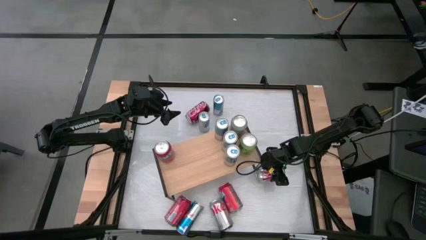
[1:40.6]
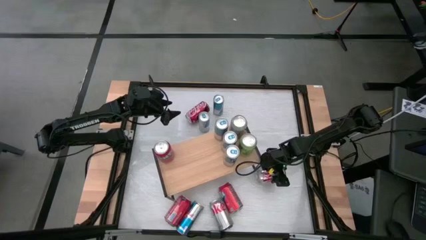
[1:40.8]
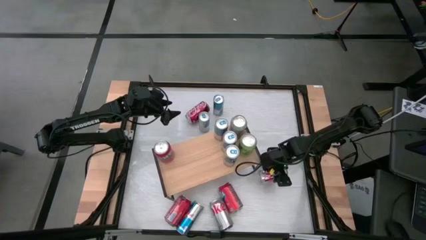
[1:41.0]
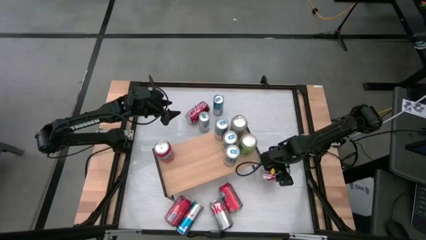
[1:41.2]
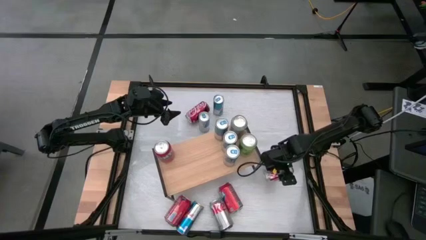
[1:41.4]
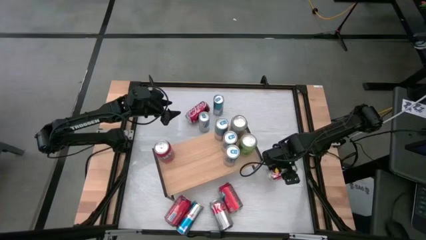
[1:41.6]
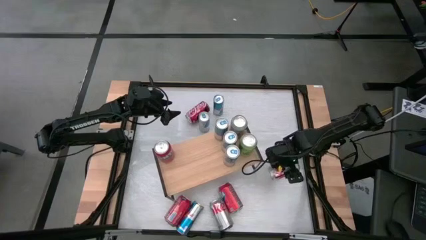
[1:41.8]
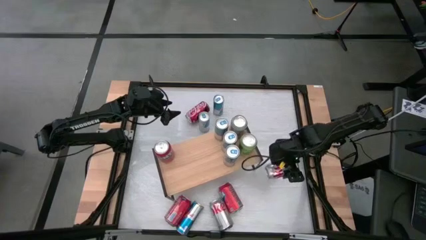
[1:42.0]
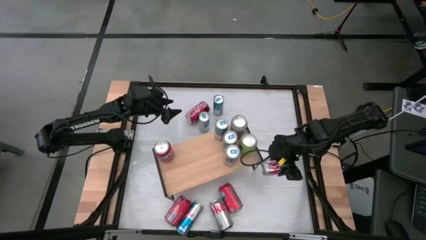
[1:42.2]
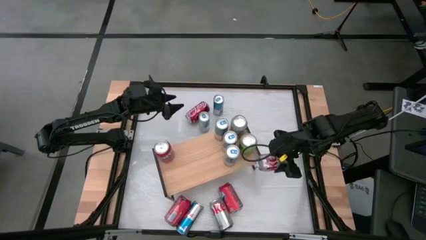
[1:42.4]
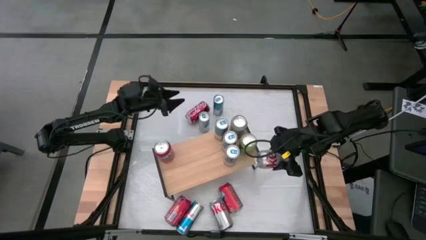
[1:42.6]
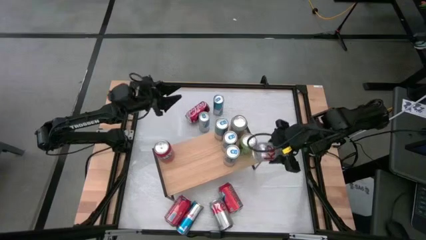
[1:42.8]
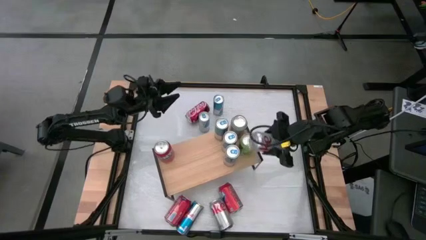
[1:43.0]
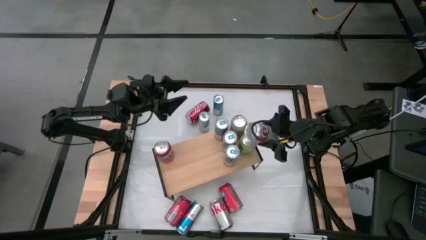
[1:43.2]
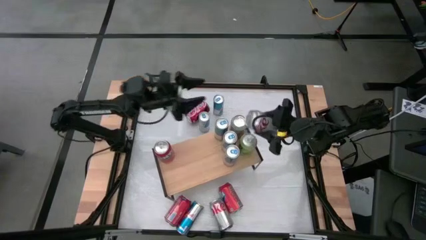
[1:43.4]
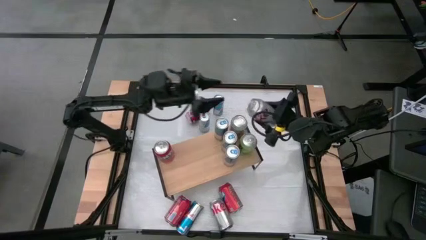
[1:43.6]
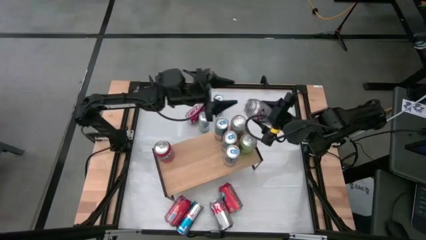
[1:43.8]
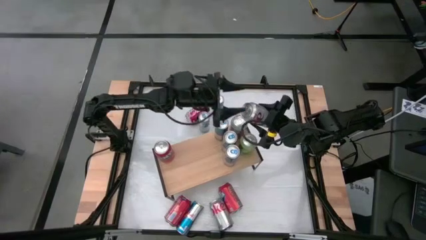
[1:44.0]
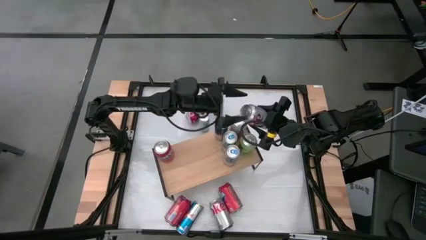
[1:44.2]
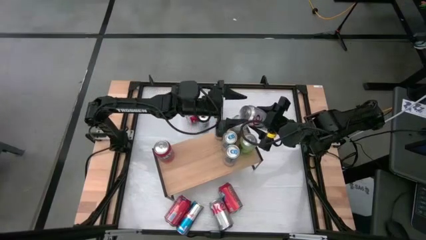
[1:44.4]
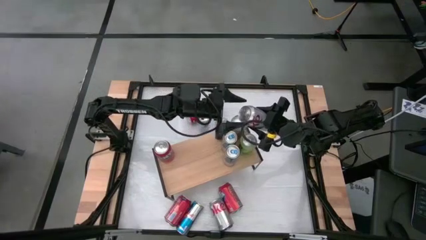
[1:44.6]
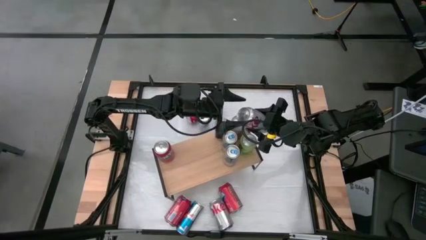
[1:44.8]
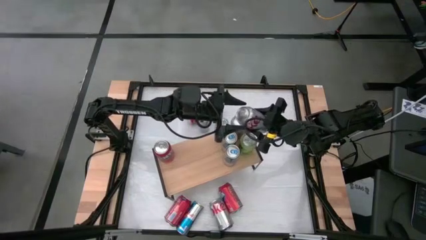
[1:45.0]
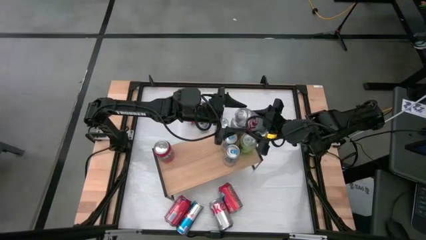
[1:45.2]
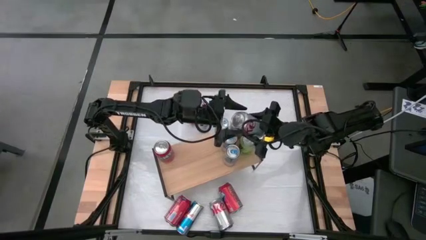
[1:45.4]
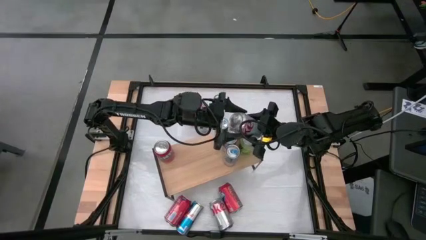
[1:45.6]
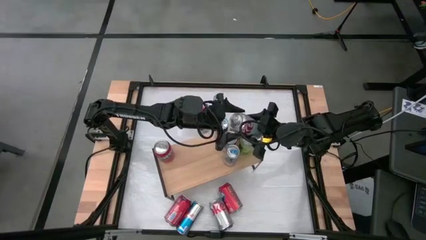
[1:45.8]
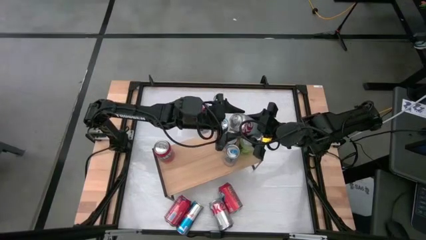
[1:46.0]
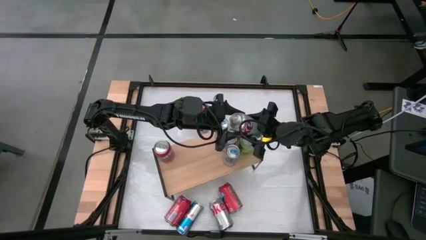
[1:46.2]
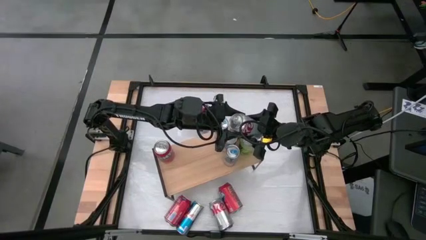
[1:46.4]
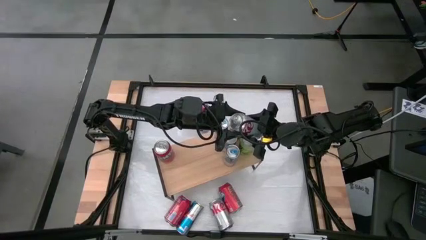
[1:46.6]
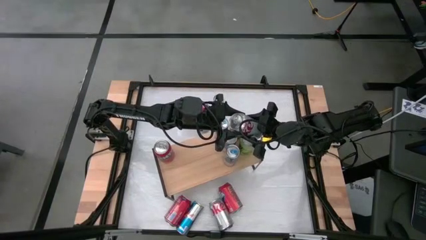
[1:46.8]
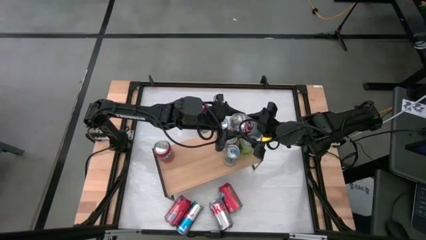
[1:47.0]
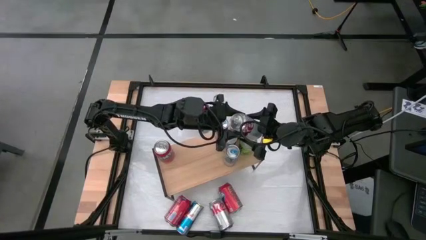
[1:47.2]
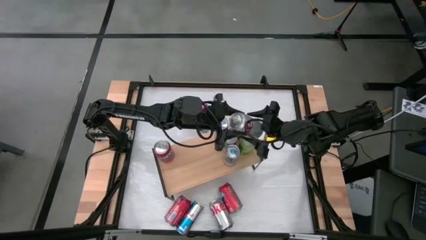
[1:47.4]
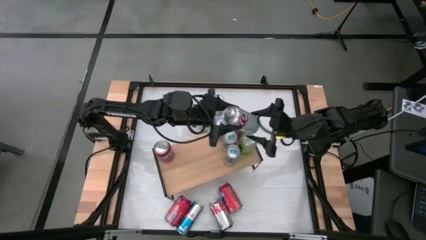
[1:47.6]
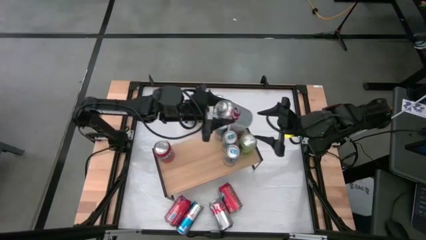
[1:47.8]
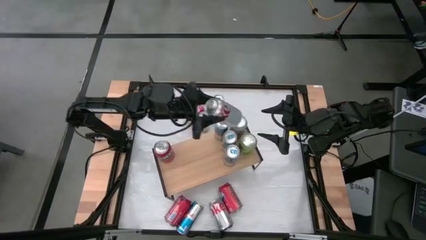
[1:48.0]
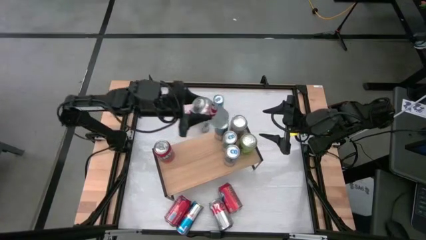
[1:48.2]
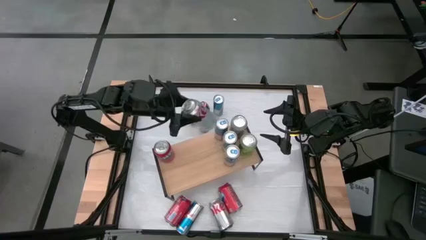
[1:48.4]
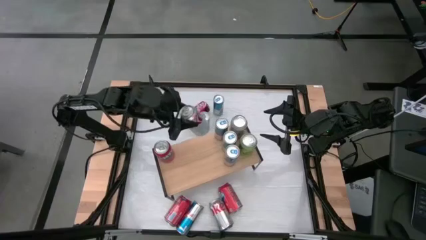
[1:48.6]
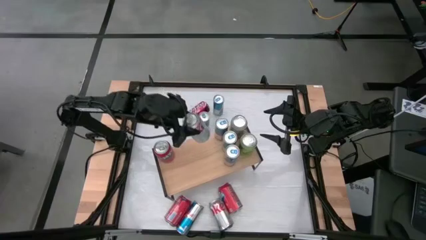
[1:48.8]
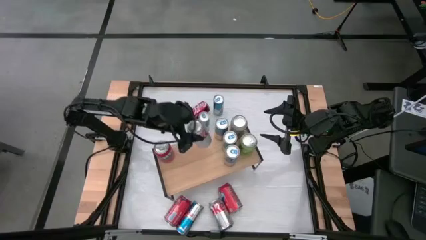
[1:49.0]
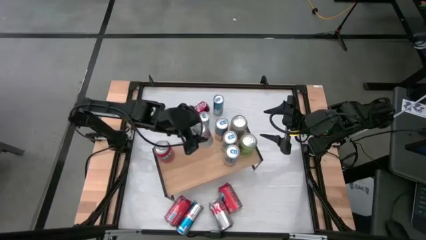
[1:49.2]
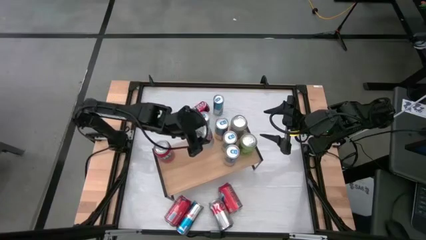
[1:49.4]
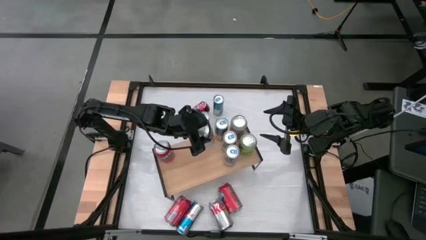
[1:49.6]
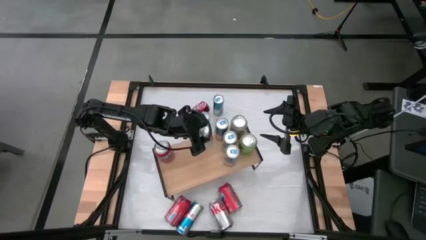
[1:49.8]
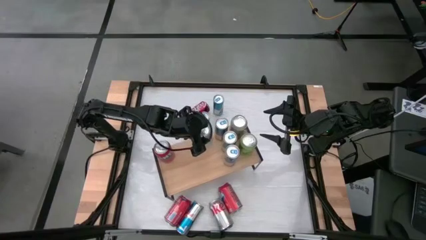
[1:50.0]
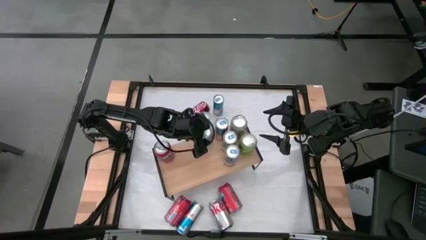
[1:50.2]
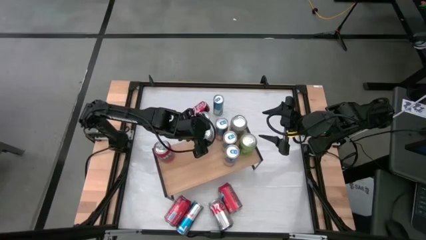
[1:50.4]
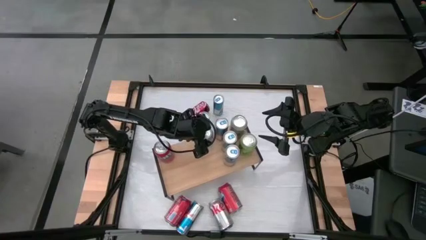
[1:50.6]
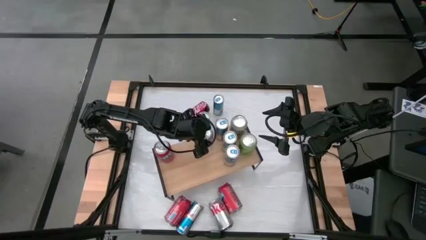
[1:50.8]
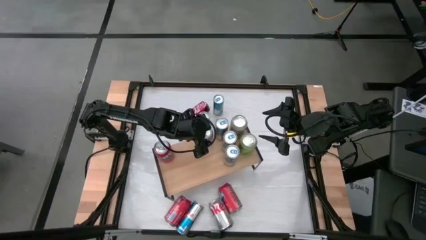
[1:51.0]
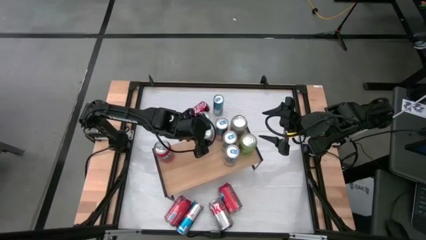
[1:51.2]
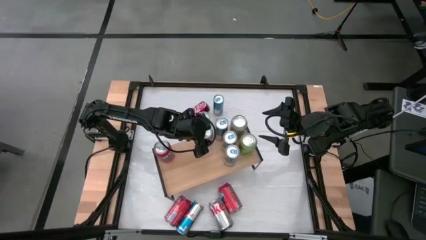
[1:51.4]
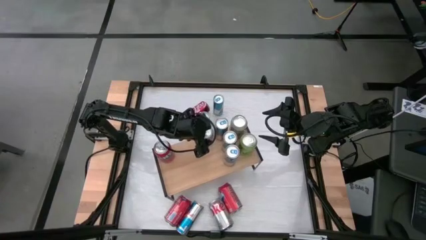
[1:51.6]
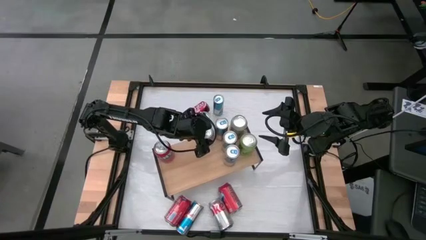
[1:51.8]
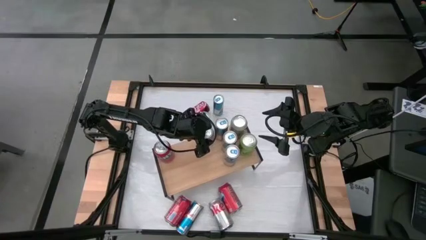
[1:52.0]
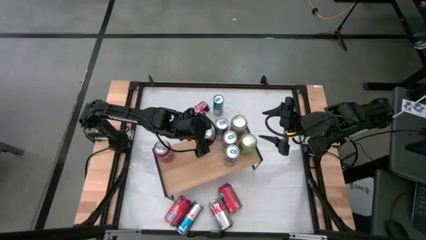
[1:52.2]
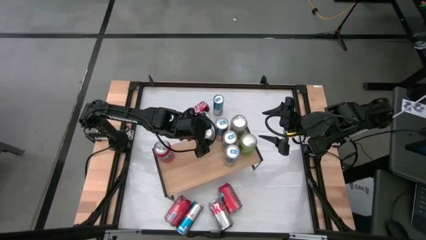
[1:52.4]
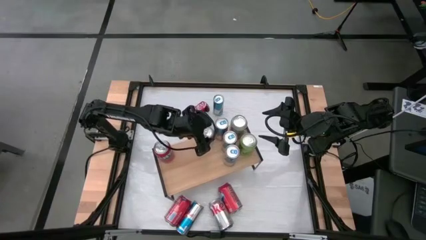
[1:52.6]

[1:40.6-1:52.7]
Task: Place canned beverage on shelf
Put the red silver soda can on the shelf

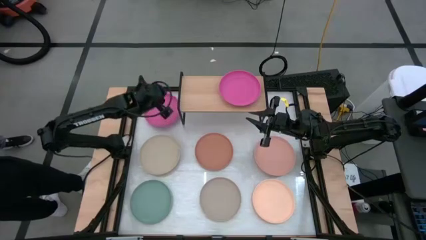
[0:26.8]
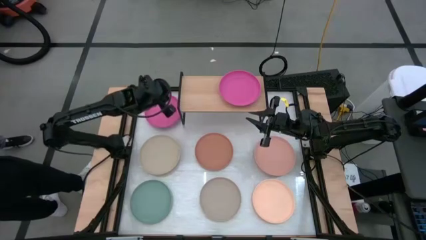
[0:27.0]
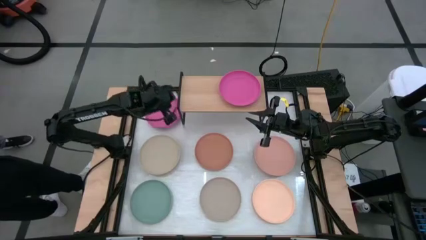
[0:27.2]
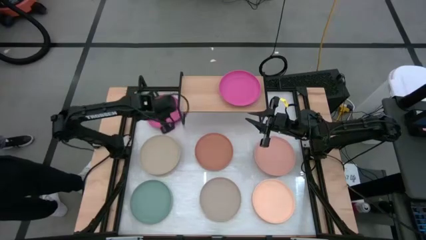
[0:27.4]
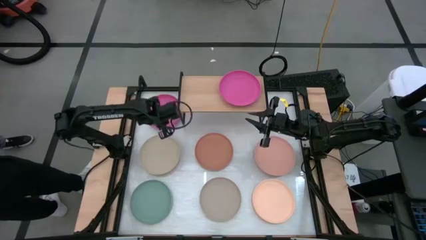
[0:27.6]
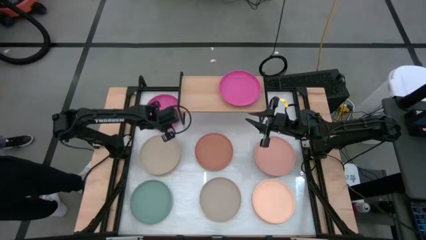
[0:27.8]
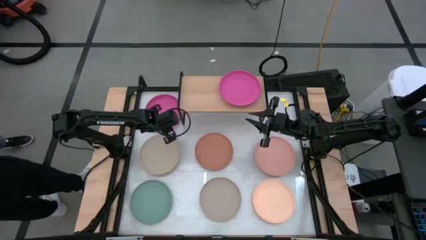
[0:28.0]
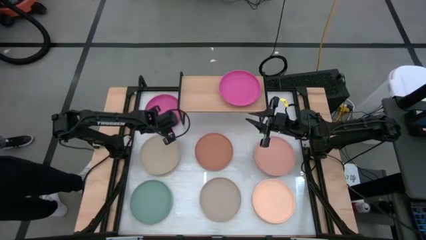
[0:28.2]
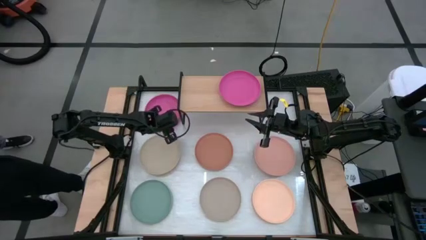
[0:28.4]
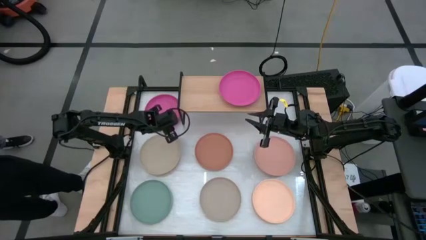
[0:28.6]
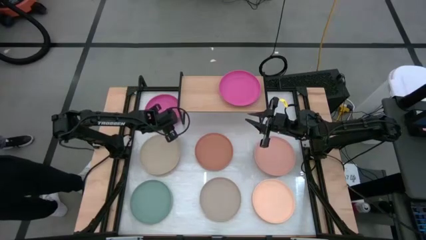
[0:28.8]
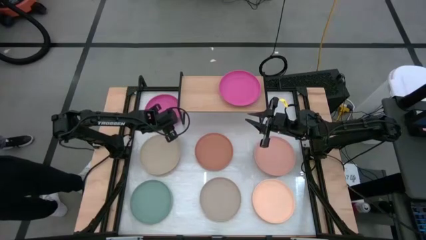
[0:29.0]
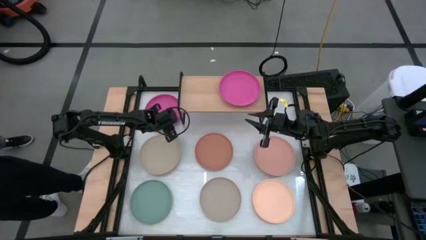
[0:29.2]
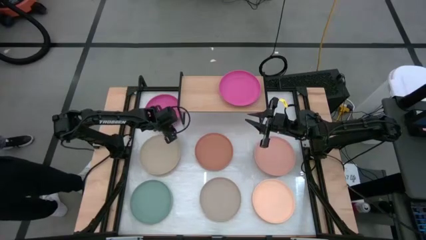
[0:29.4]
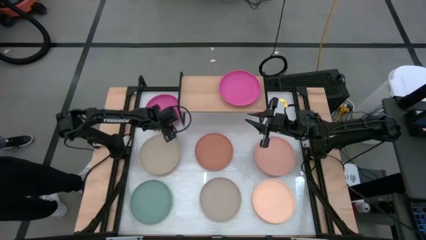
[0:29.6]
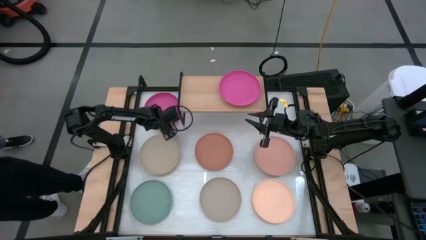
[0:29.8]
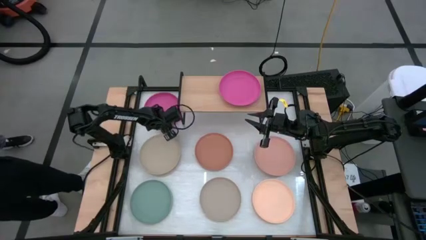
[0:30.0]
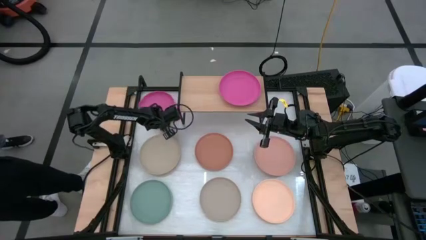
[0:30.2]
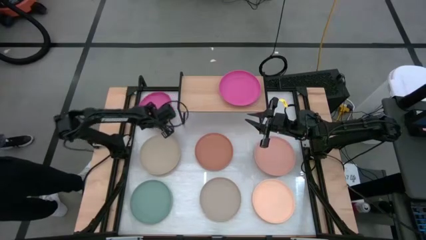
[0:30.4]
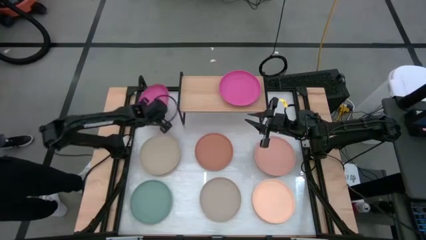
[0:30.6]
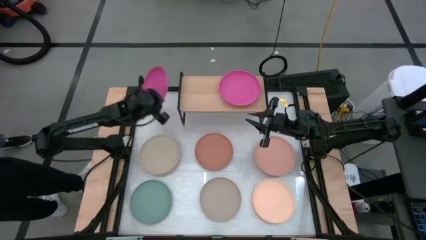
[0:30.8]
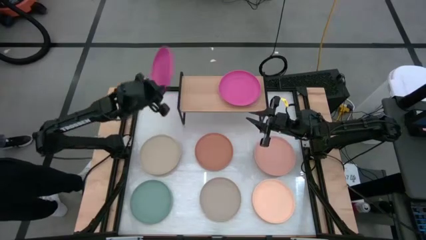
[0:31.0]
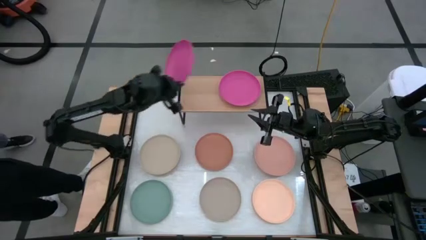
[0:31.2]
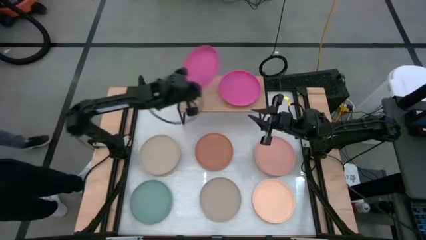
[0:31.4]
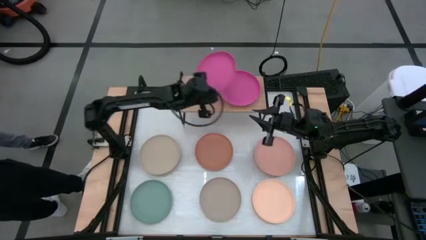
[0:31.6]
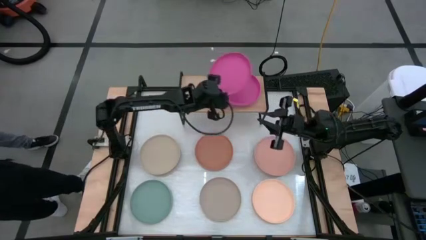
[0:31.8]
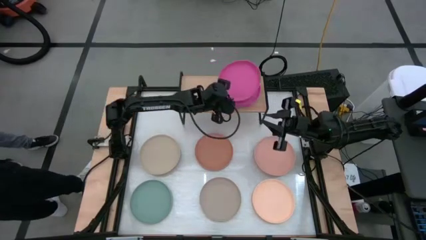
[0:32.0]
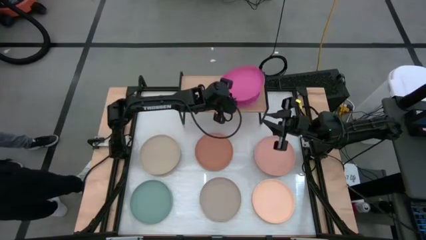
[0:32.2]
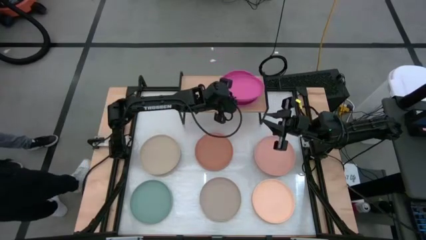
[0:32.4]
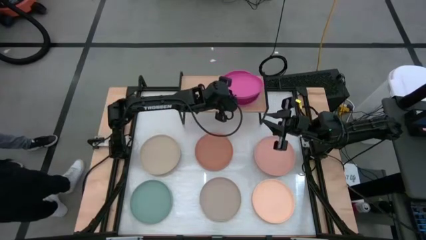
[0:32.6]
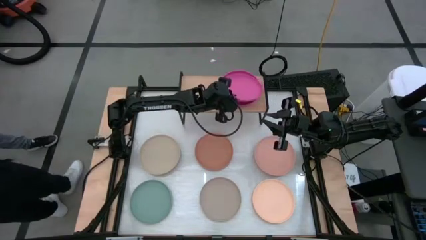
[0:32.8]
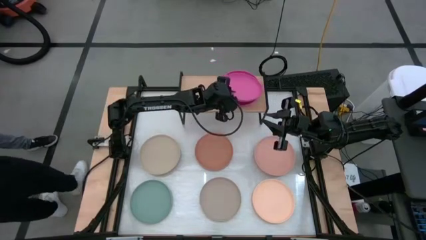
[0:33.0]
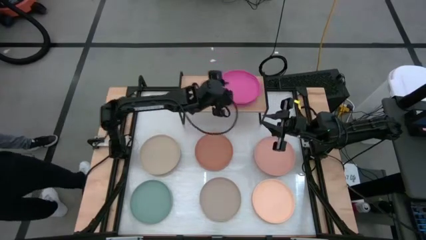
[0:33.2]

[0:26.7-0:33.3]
Task: Place and stack plates onto a shelf
Stack the pink plate on top of pink plate on the shelf
